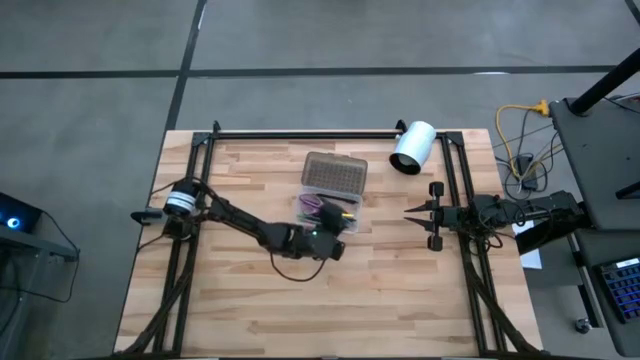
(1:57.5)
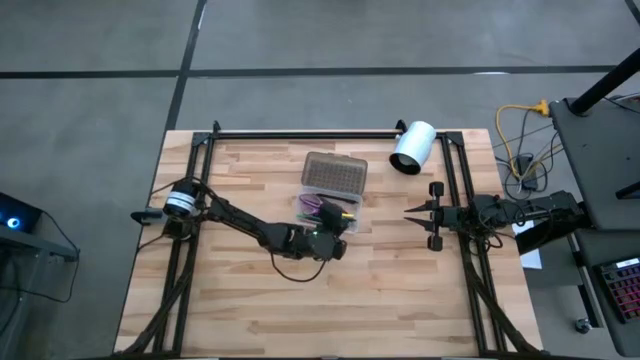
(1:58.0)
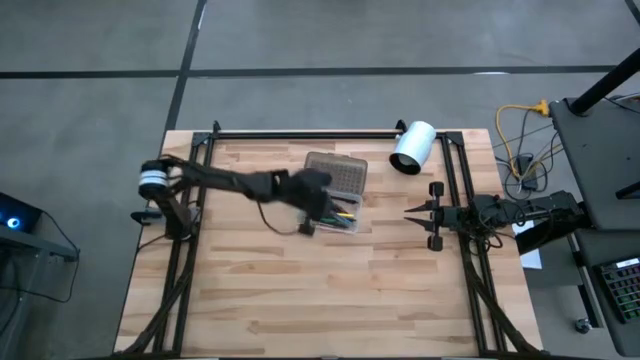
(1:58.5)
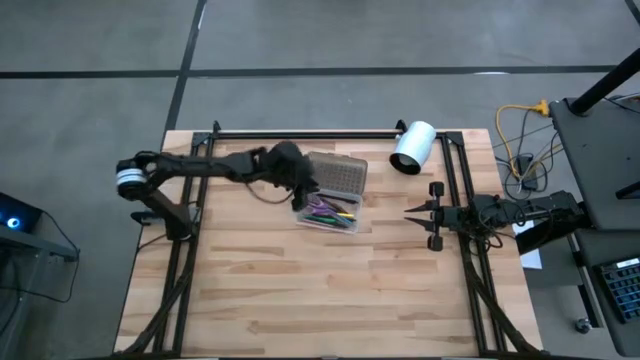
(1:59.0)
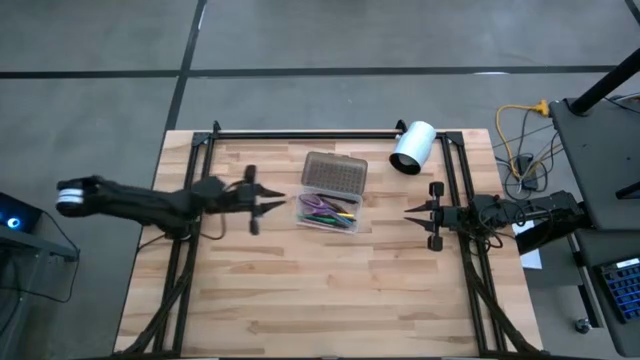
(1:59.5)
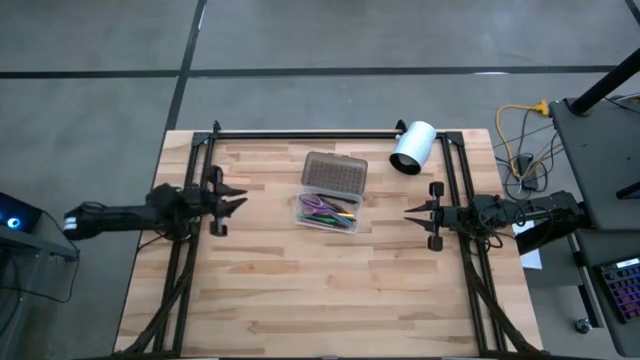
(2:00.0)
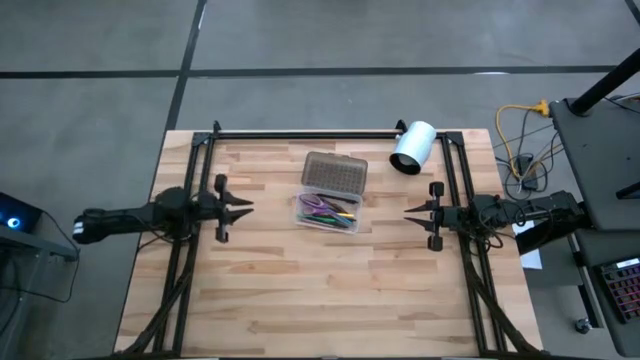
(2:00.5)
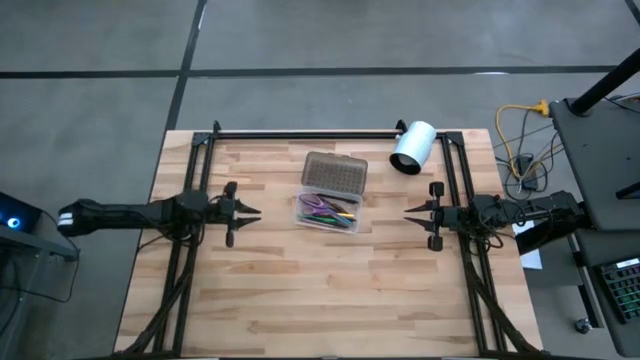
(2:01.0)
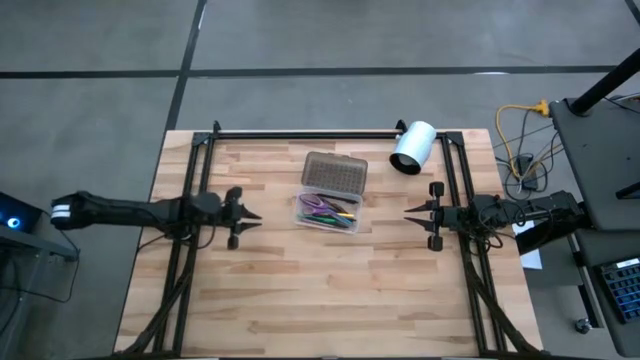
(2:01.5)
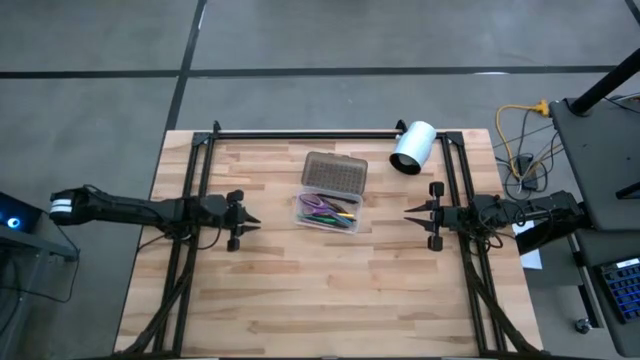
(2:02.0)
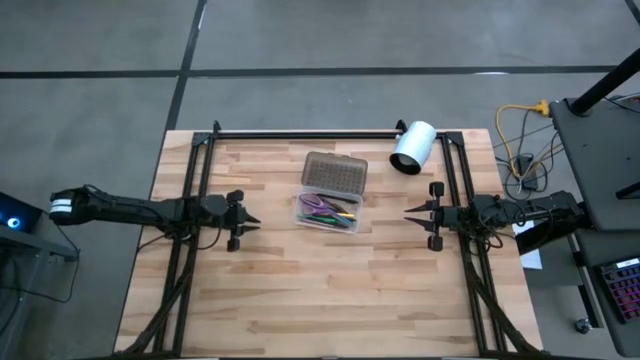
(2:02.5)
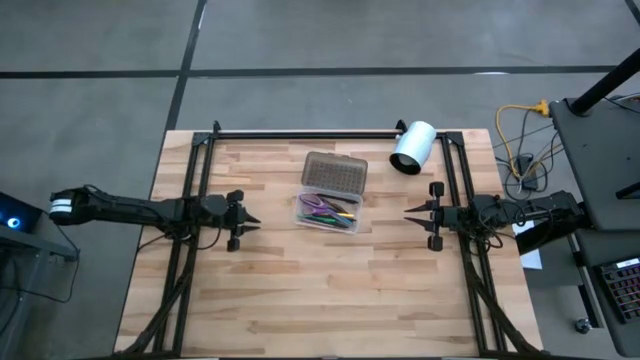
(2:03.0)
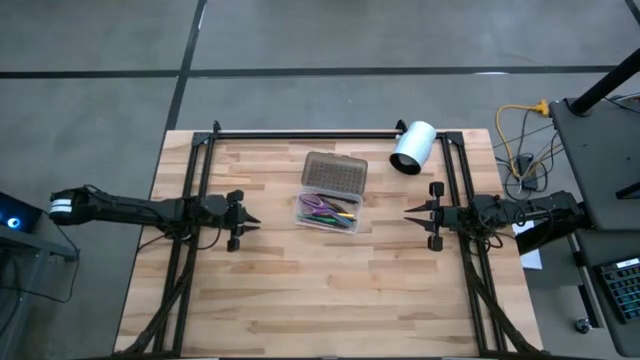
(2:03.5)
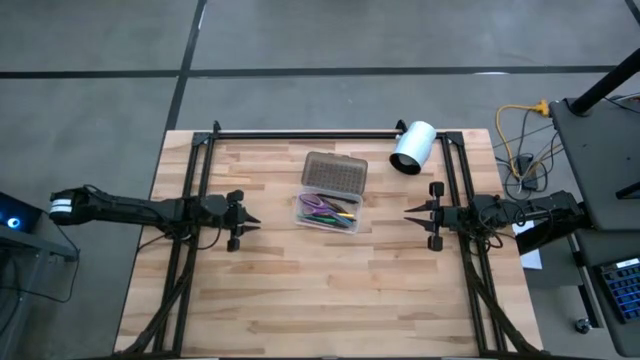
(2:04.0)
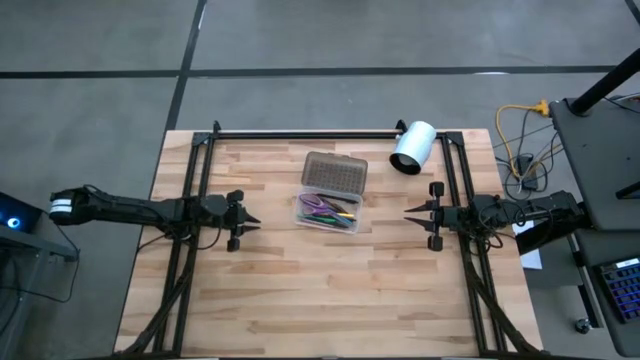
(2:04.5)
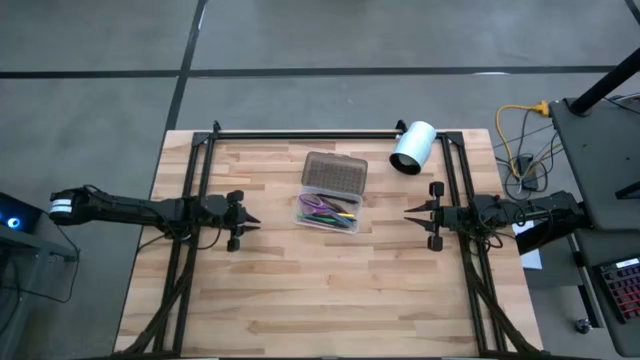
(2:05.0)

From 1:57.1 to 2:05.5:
Task: Pick & place school supplies into a supply box
Return to Home Position

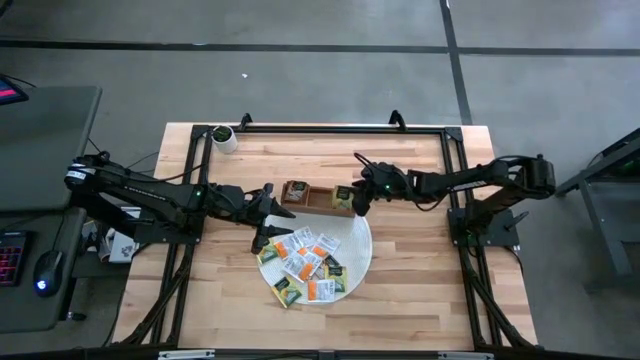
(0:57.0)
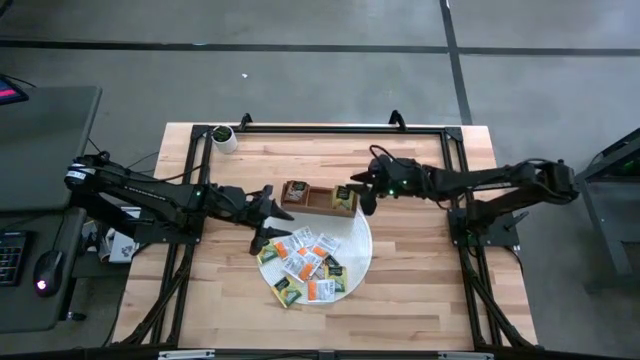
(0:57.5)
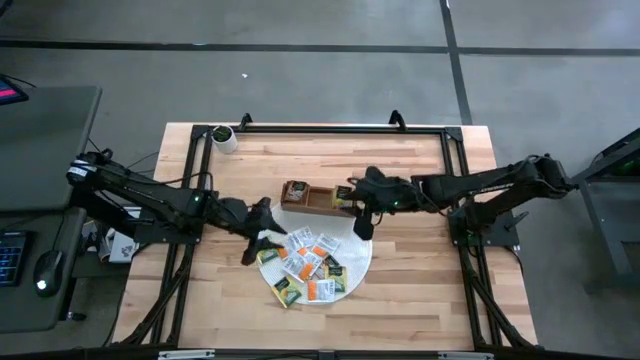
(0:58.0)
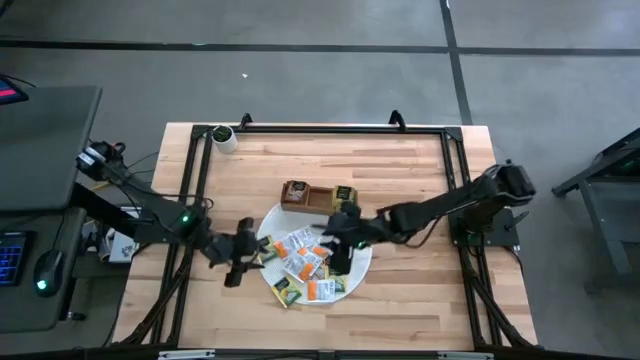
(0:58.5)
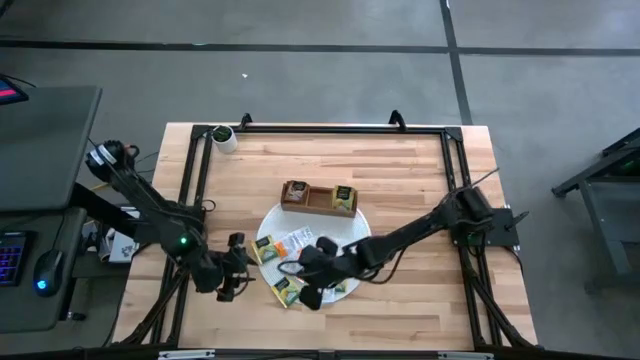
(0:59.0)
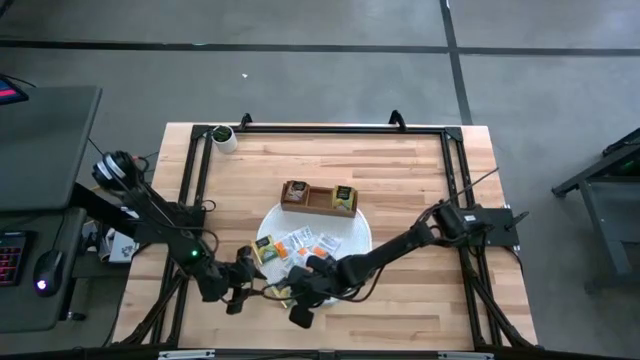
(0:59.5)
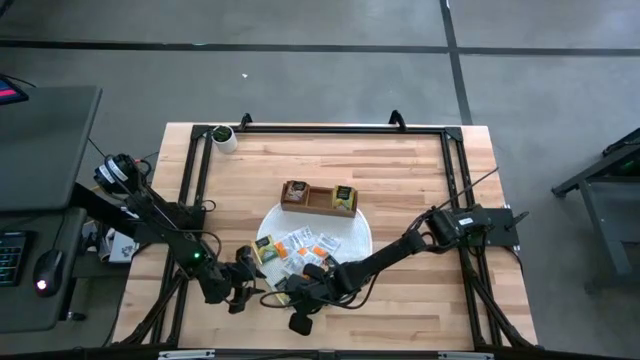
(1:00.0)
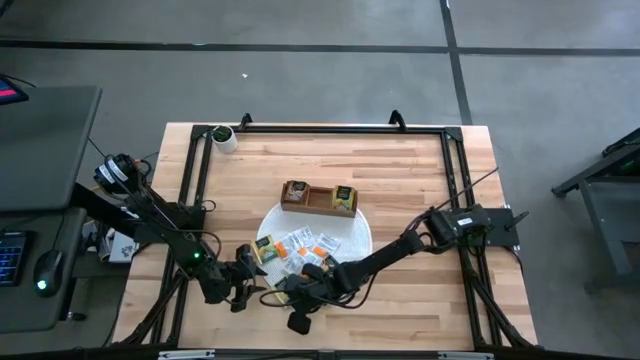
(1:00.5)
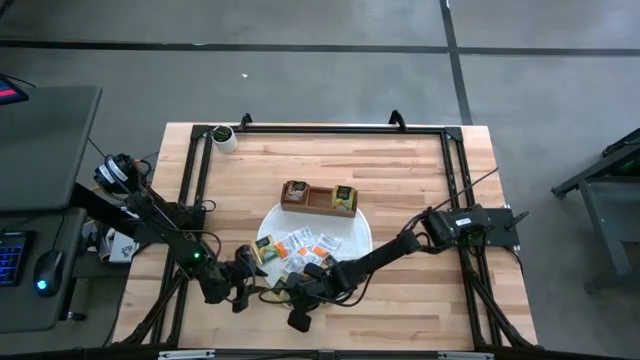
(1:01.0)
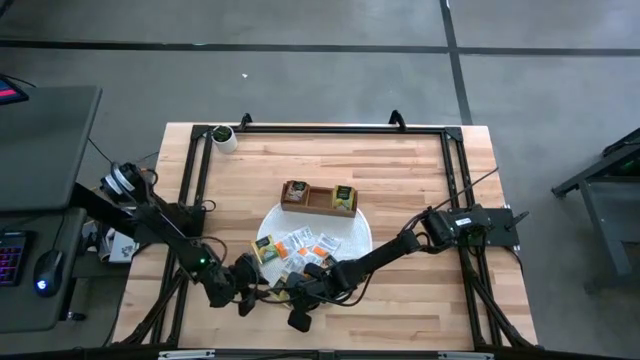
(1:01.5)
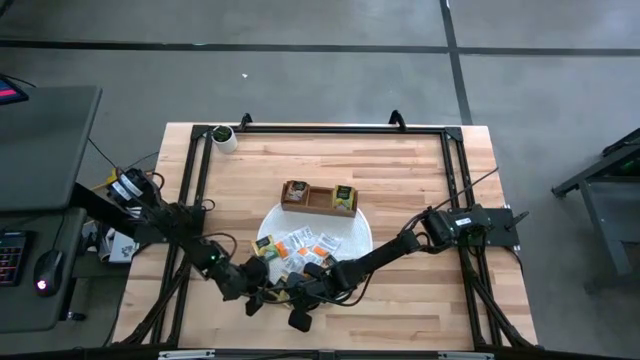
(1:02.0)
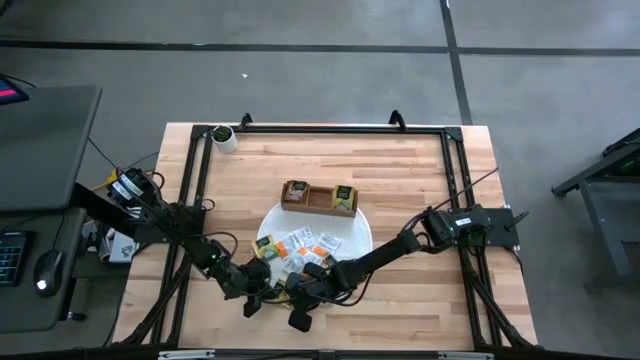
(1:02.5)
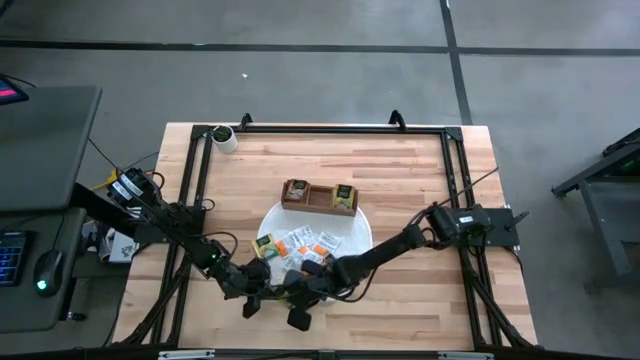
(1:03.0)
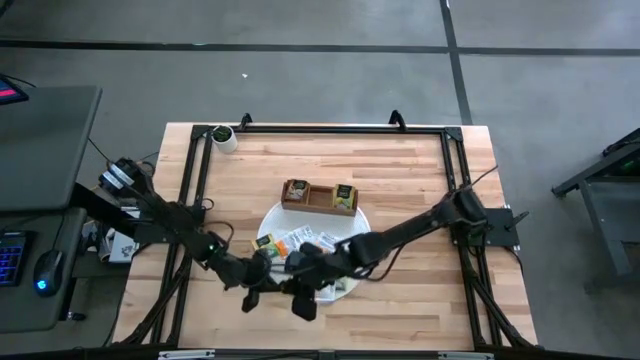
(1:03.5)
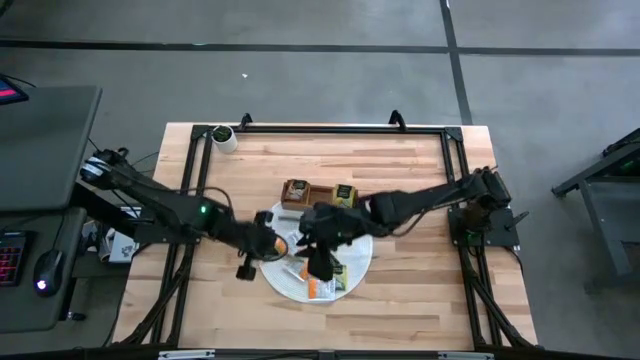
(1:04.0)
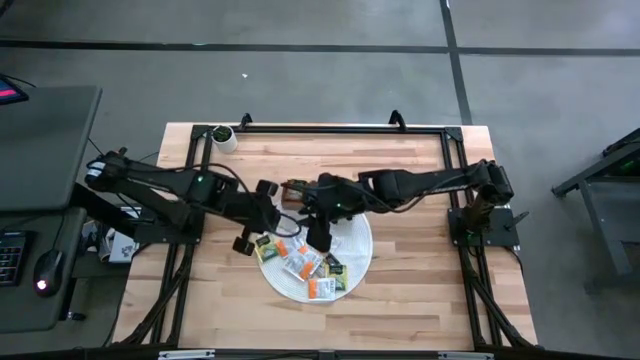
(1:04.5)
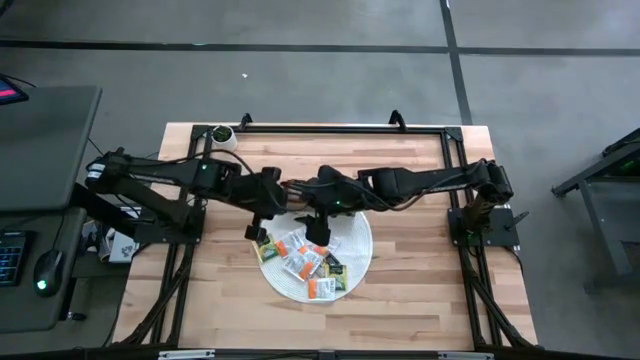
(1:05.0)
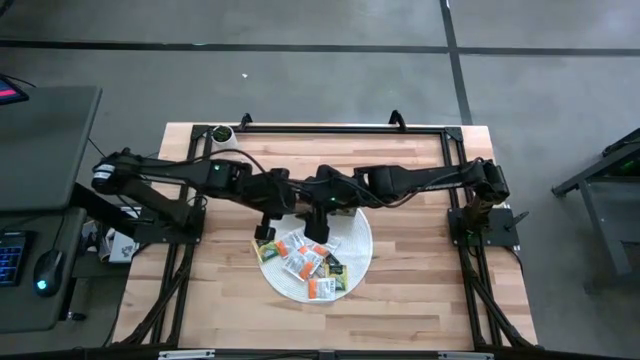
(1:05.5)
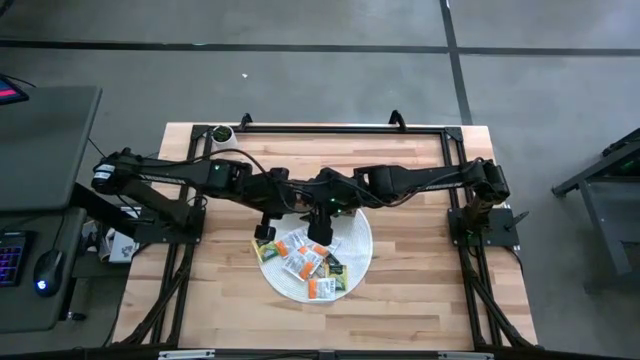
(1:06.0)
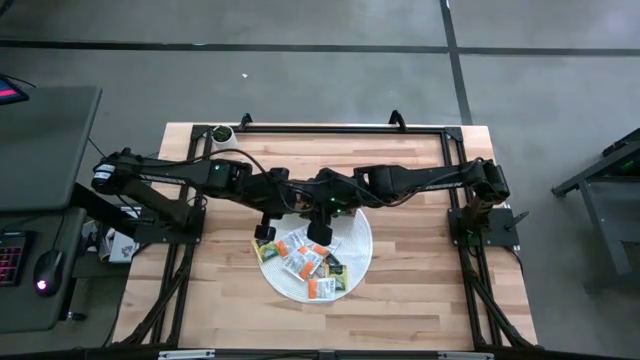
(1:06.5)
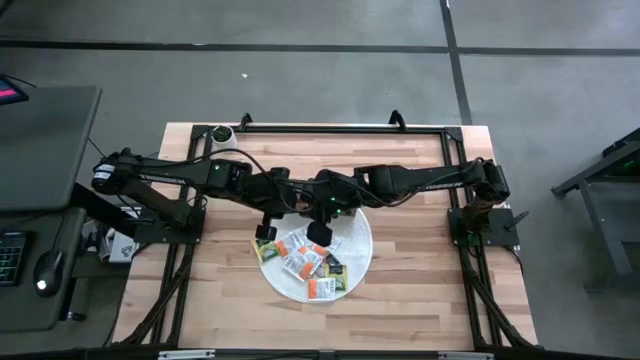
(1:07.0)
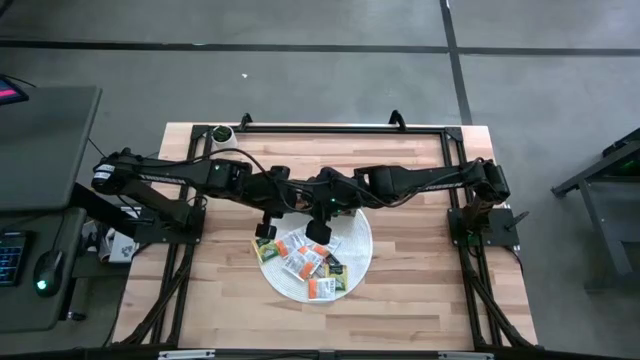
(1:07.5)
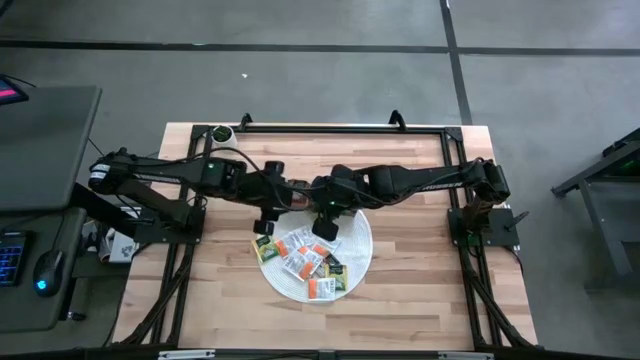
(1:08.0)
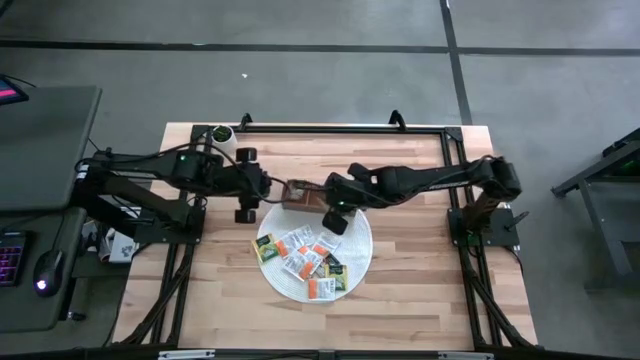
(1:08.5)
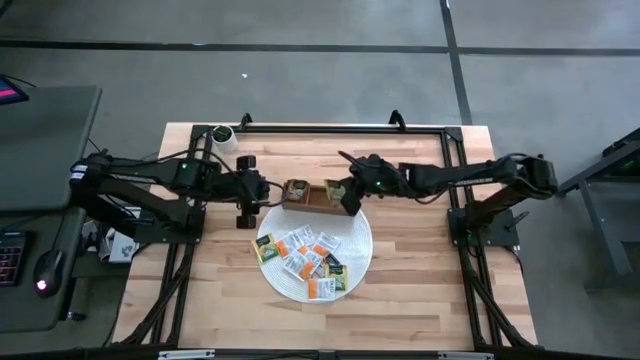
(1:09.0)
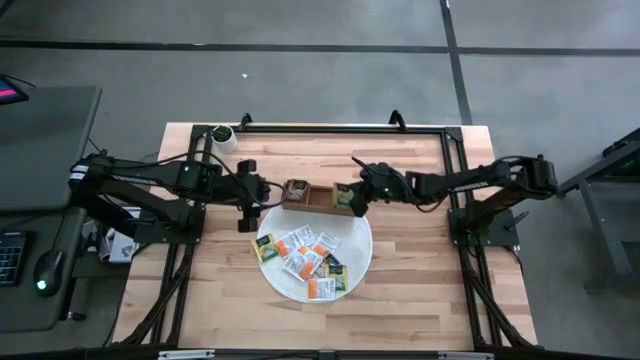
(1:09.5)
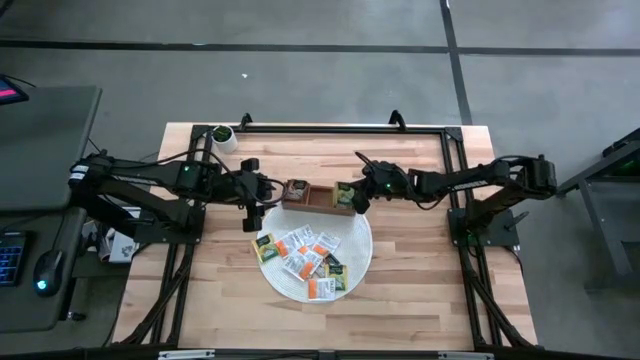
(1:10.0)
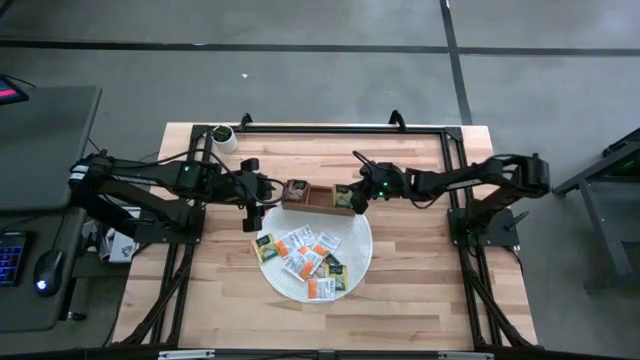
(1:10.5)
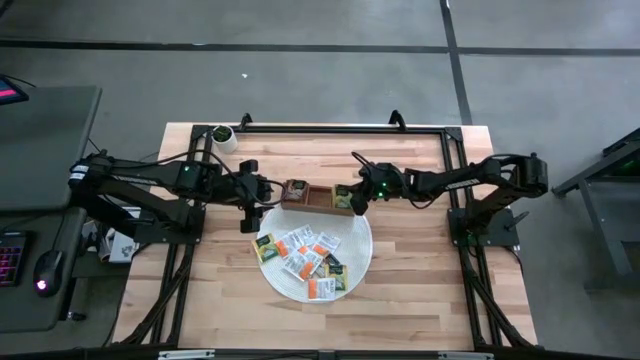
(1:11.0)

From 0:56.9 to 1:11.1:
Task: Pick & Place Tea
Put the yellow tea bag into the right section of the wooden organizer
